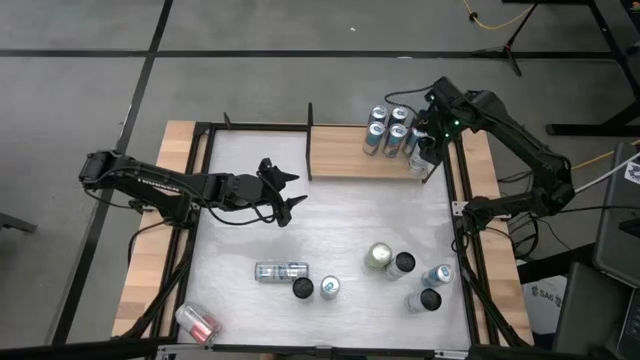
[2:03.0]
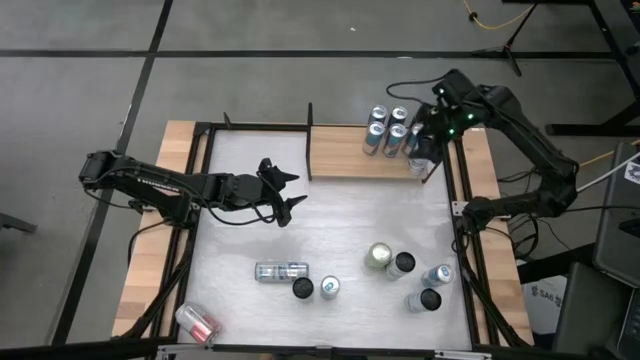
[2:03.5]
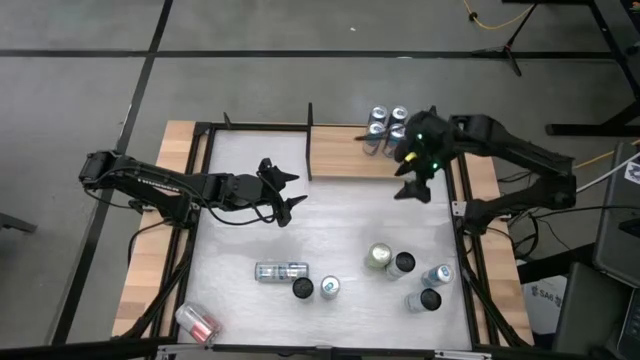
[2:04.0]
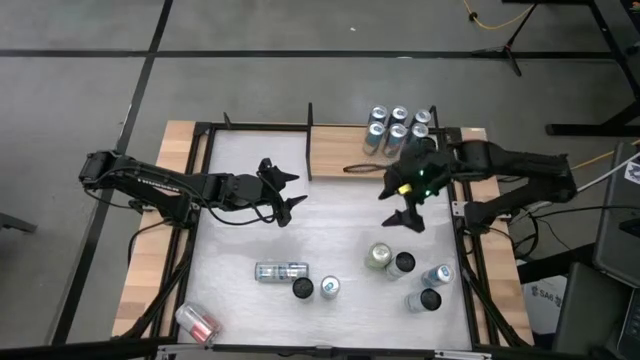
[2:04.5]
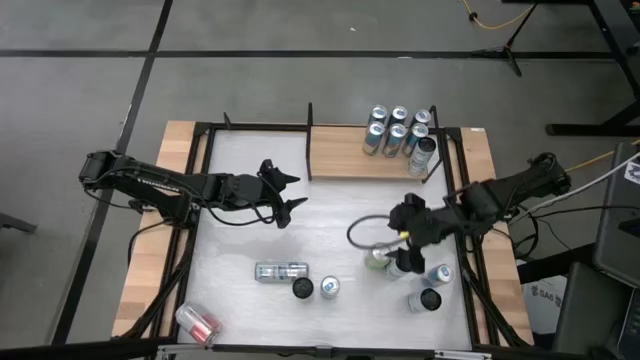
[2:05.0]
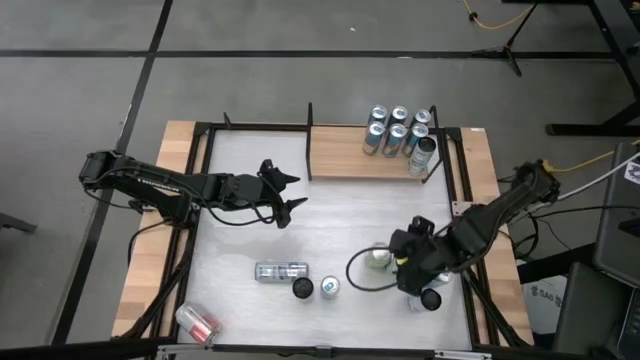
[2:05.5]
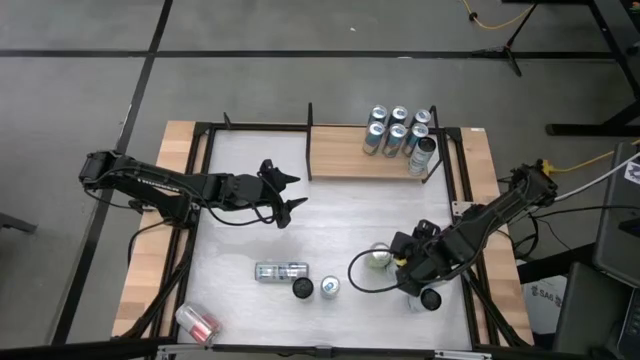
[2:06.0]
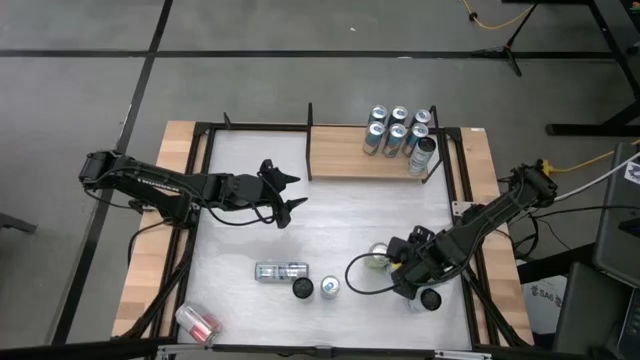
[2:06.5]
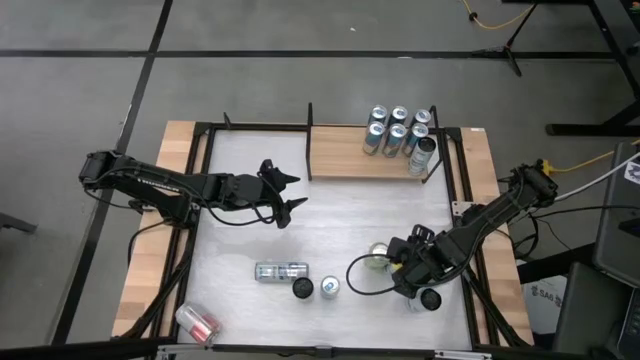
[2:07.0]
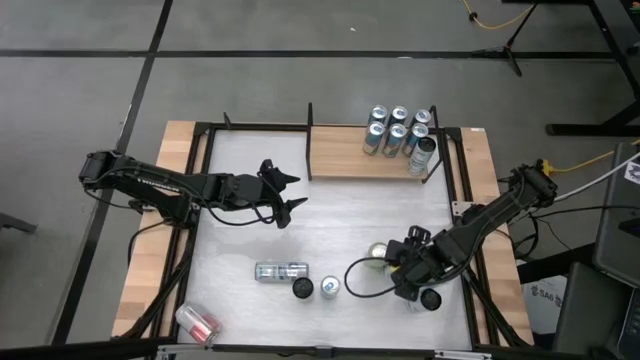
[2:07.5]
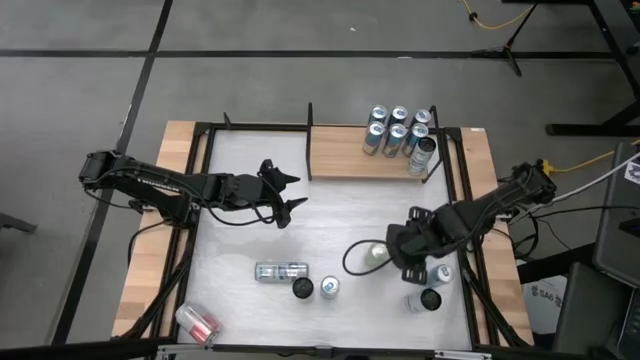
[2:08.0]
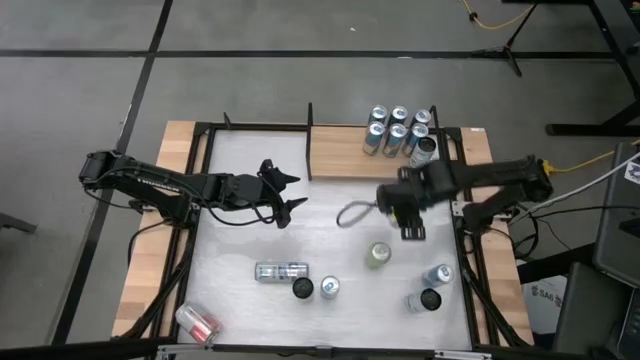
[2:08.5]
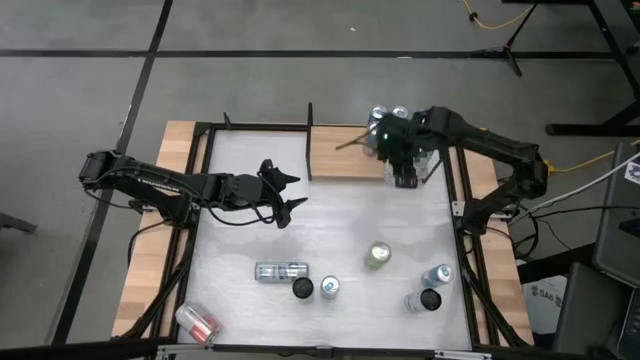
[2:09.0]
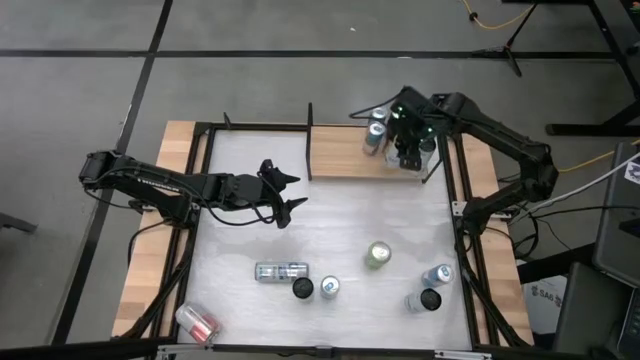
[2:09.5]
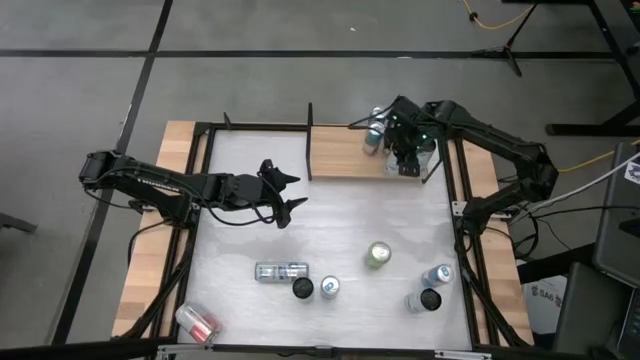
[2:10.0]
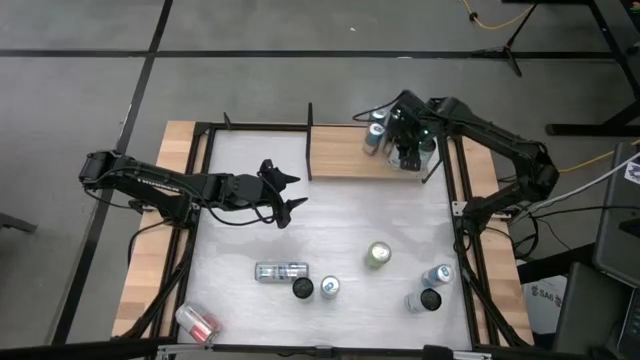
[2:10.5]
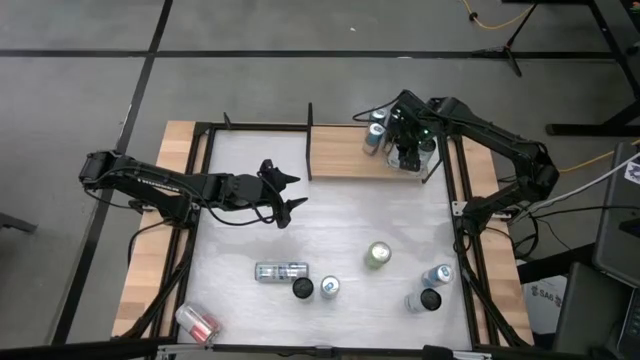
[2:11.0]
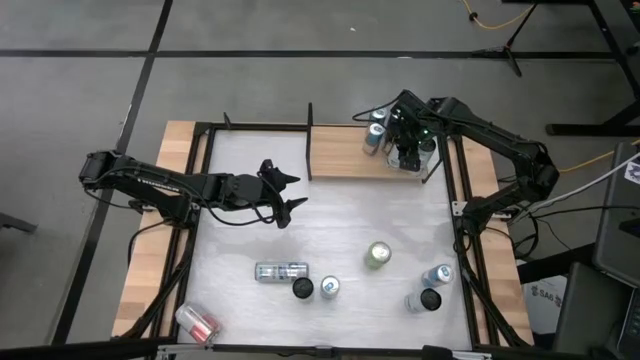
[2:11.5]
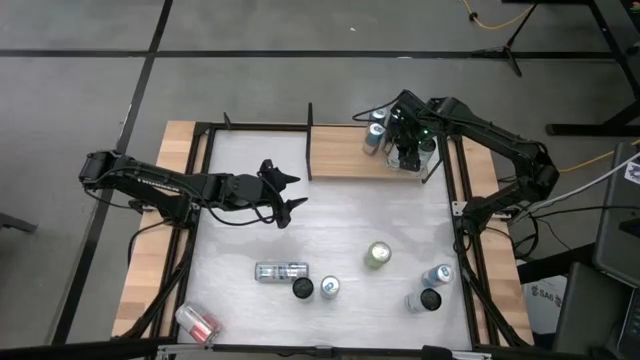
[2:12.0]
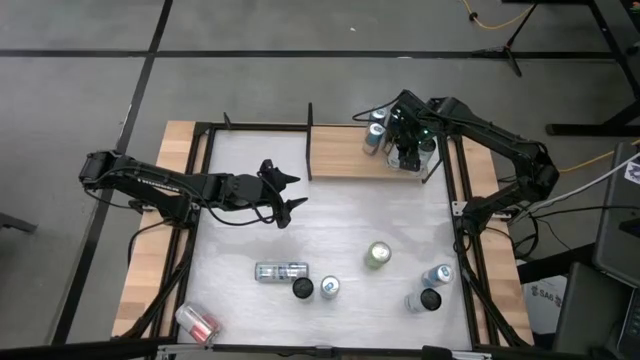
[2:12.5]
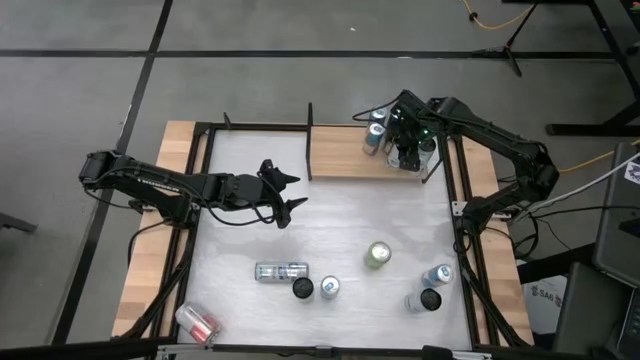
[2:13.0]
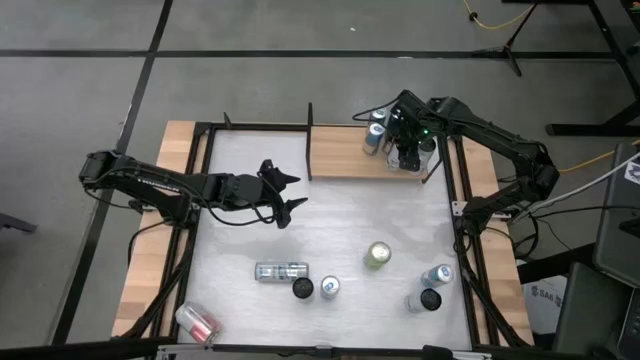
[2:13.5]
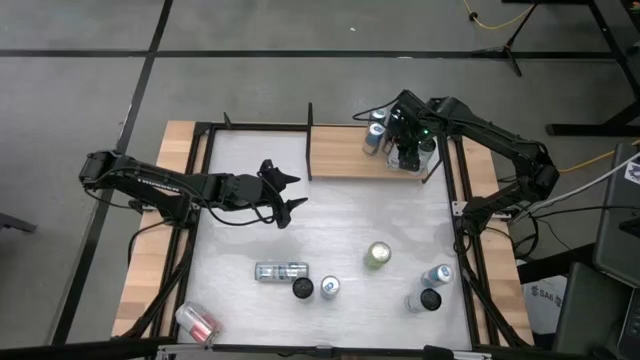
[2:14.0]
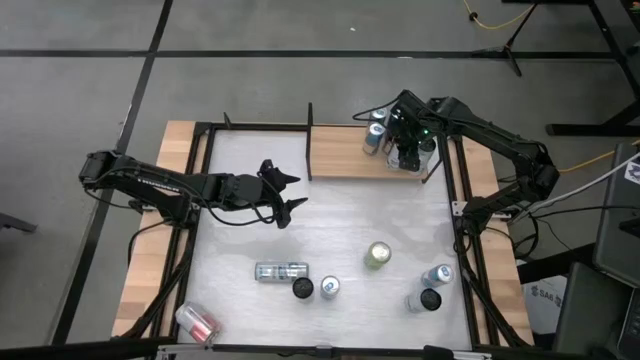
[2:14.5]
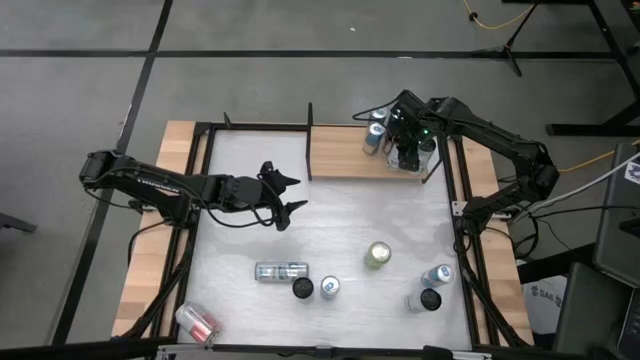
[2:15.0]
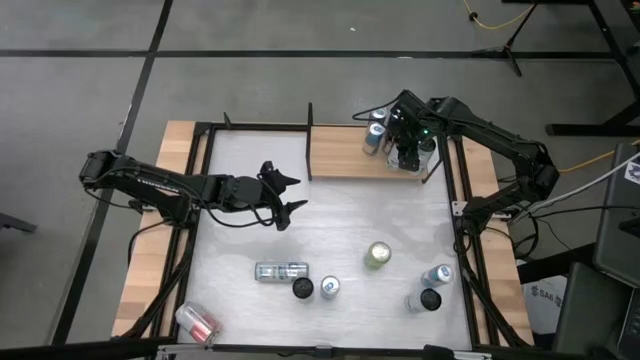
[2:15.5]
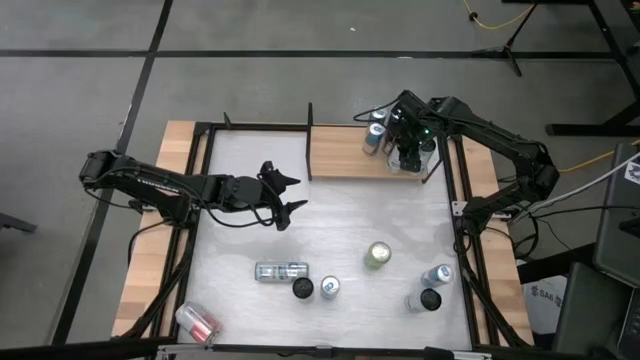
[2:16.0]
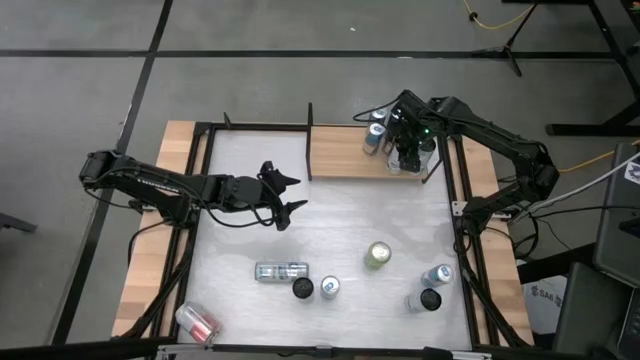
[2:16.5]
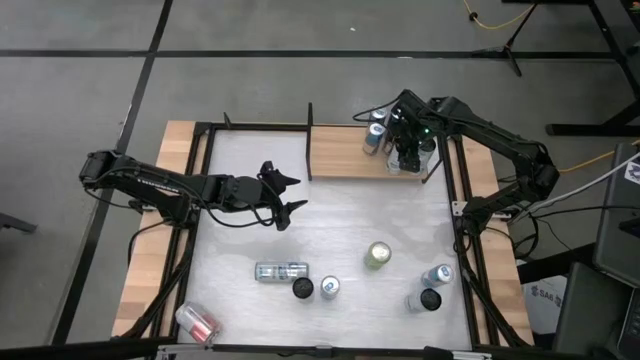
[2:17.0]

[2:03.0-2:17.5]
Task: Place canned beverage on shelf
Put the white-blue soda can on the shelf aligned with the other white-blue soda can

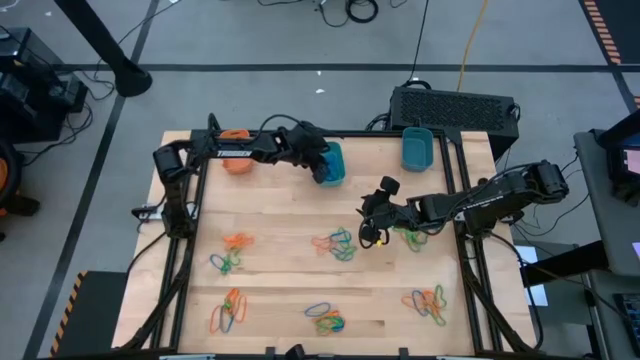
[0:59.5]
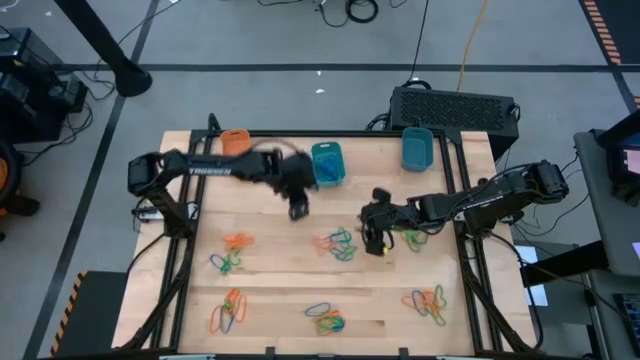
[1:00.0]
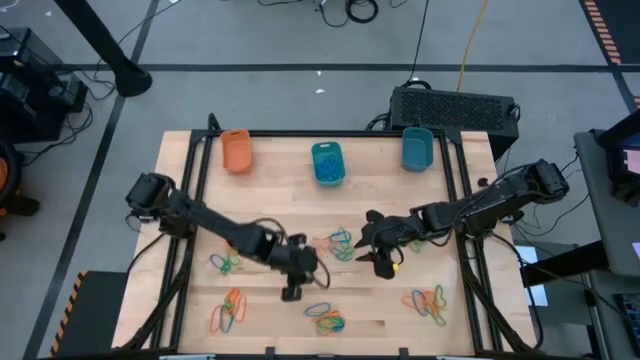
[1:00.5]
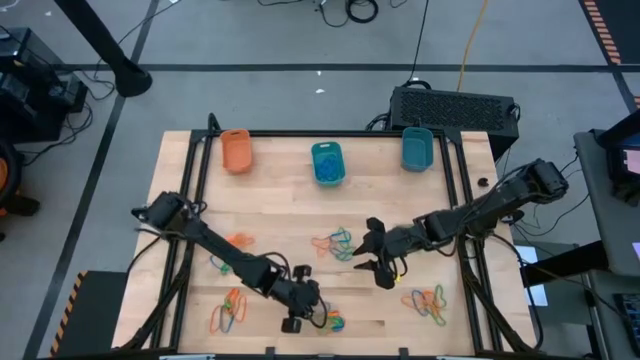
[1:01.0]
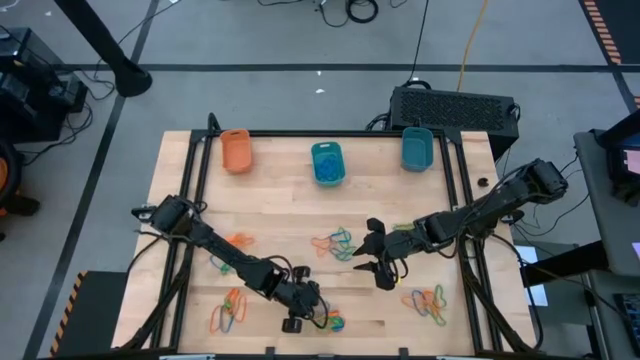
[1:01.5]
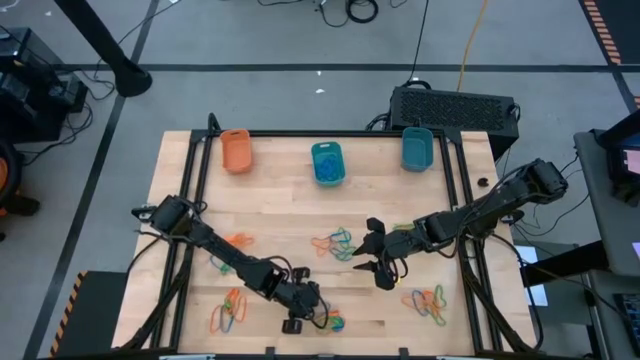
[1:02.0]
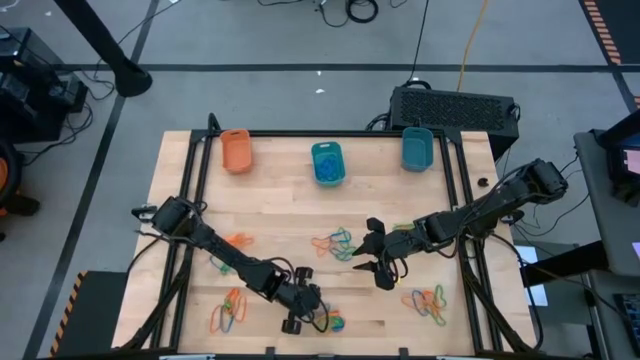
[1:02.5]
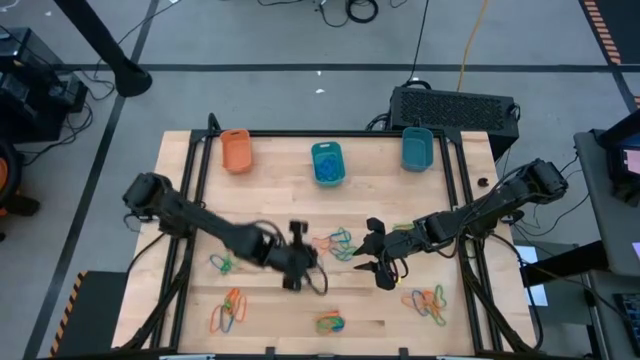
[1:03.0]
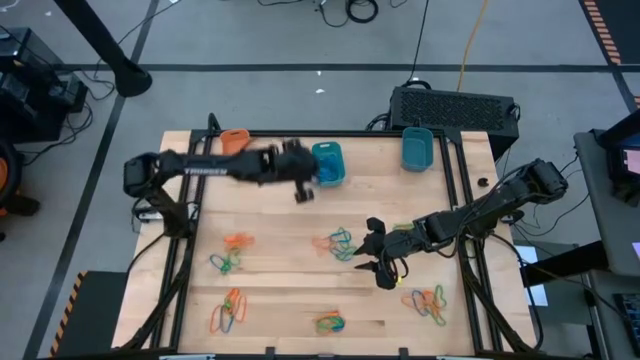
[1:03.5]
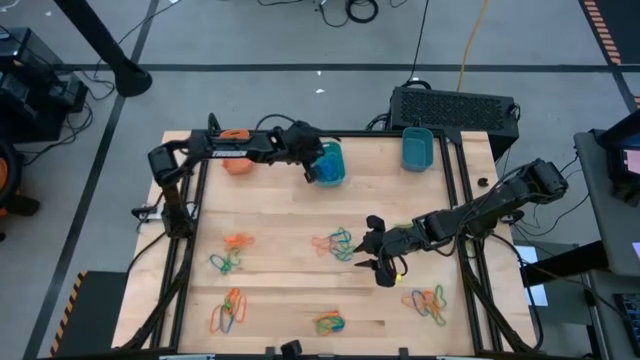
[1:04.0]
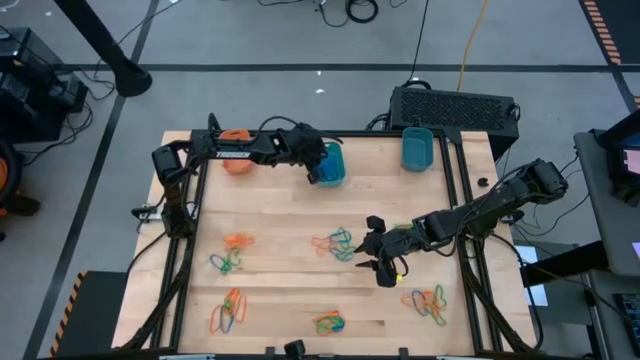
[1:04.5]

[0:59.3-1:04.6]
Task: Sort rubber bands into baskets
Put the blue rubber band into the light blue bin

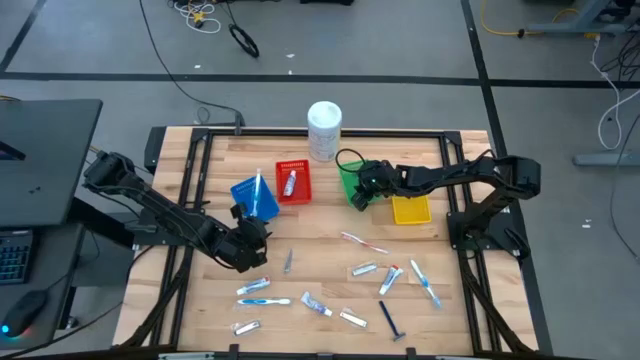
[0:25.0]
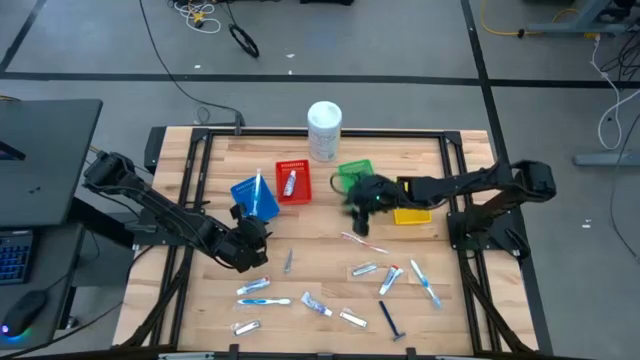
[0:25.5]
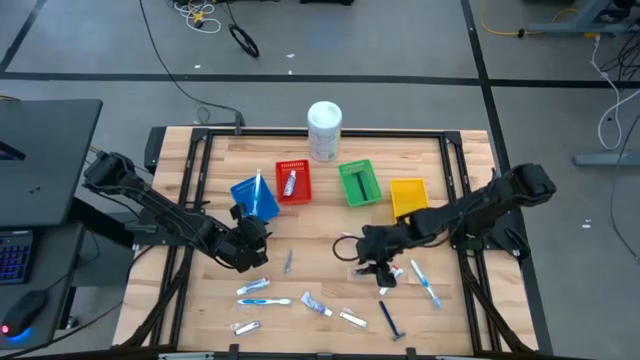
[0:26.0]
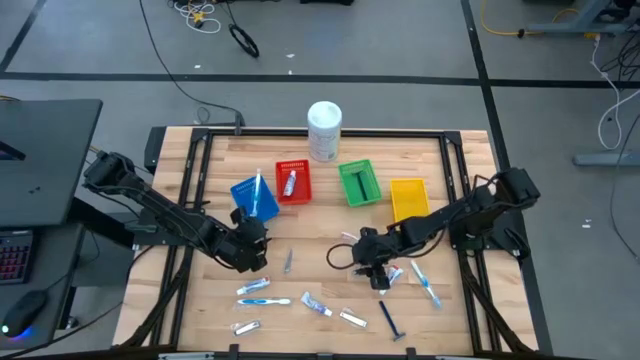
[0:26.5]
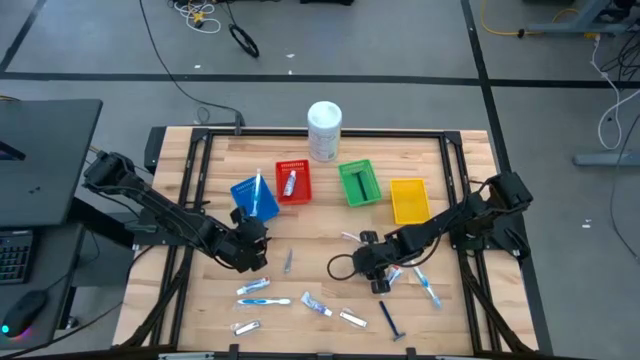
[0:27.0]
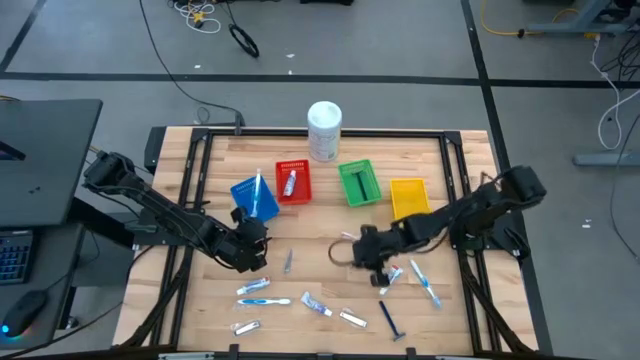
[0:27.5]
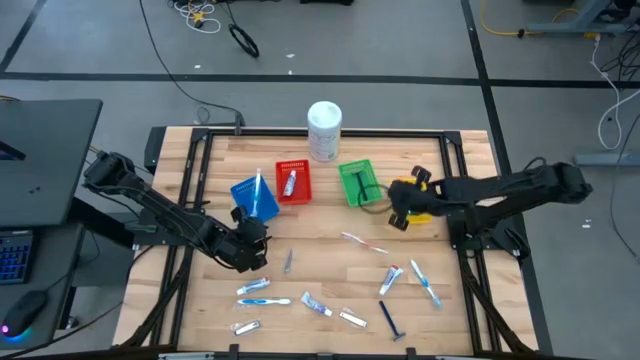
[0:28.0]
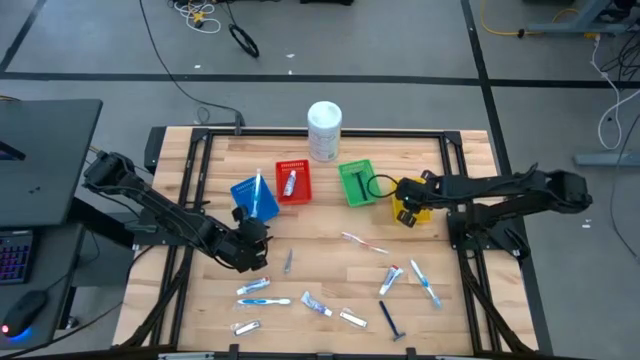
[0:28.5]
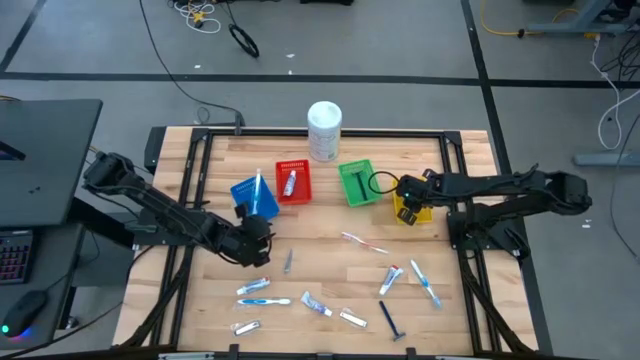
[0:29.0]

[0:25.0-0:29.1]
Task: Pick & Place Travel size toiletries
Put the nail cutter into the yellow bin
